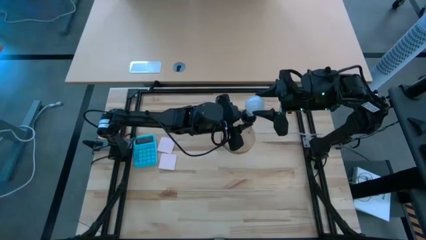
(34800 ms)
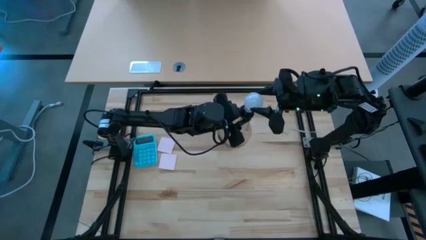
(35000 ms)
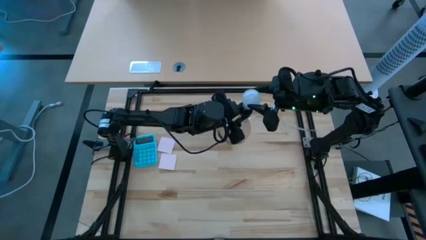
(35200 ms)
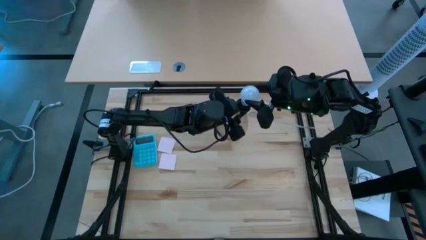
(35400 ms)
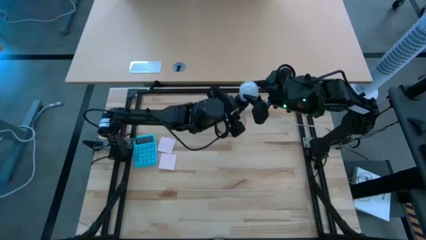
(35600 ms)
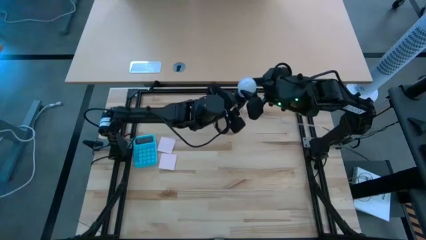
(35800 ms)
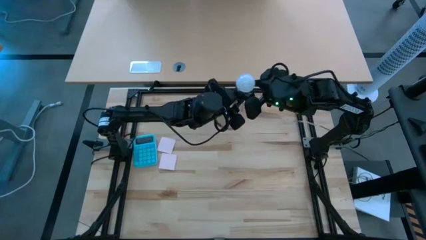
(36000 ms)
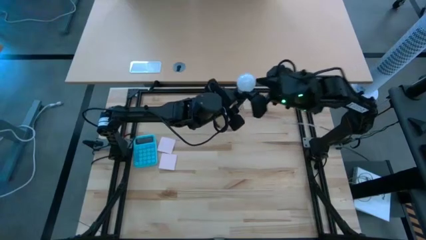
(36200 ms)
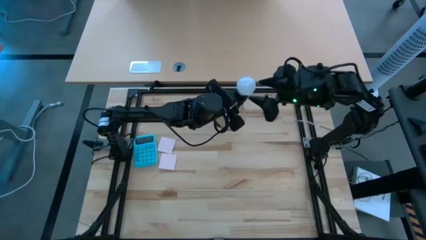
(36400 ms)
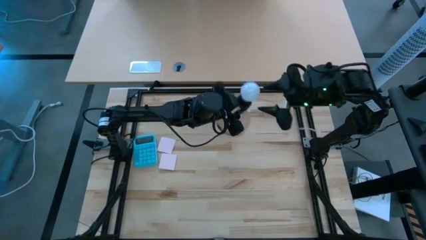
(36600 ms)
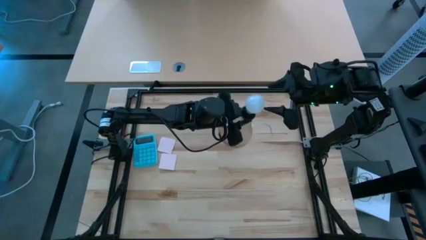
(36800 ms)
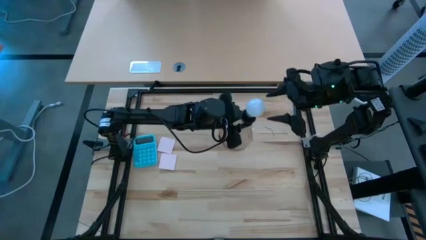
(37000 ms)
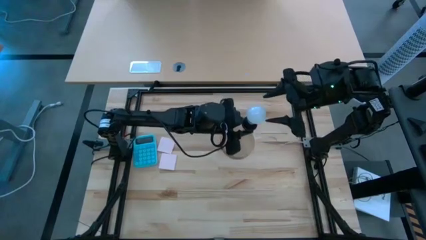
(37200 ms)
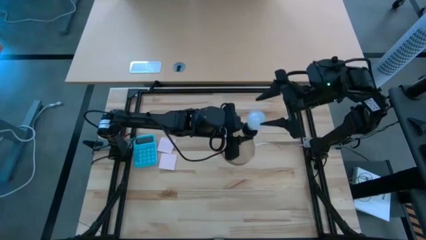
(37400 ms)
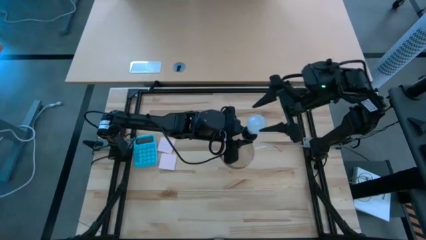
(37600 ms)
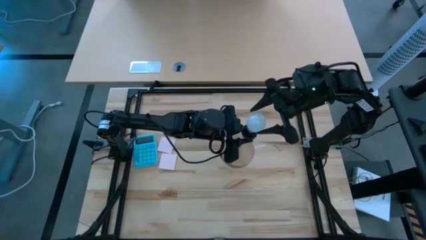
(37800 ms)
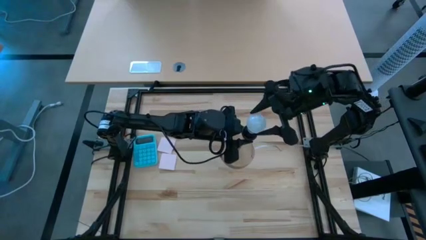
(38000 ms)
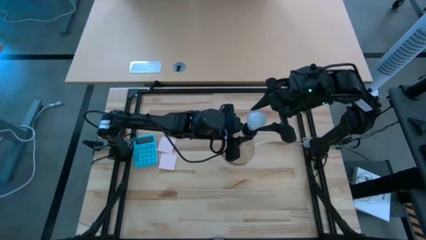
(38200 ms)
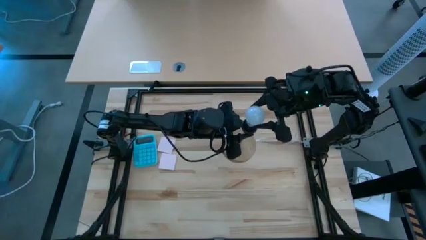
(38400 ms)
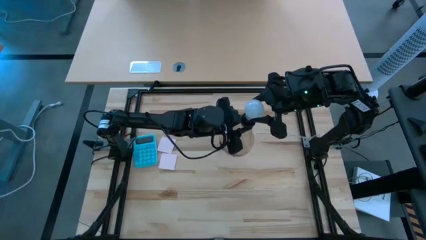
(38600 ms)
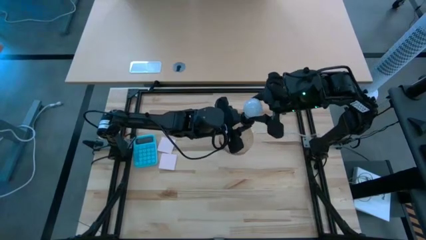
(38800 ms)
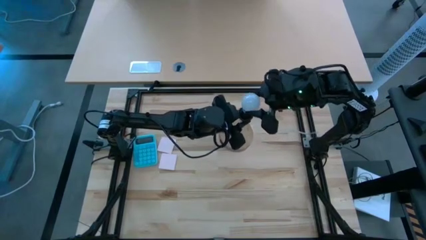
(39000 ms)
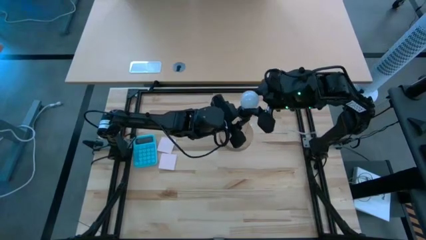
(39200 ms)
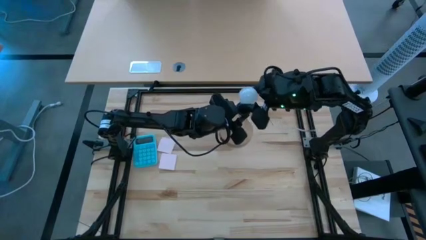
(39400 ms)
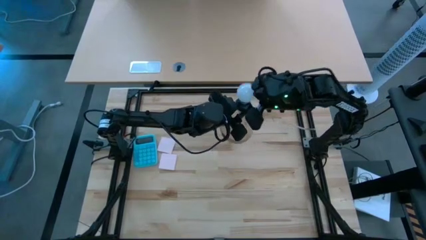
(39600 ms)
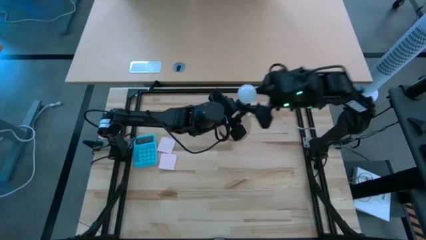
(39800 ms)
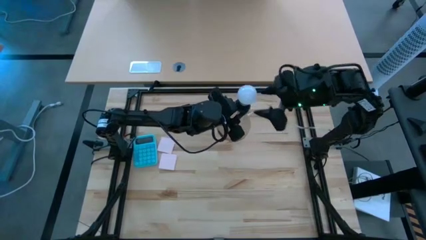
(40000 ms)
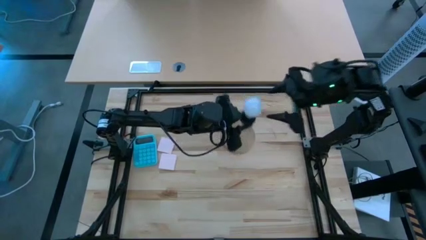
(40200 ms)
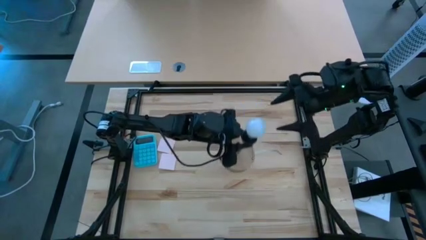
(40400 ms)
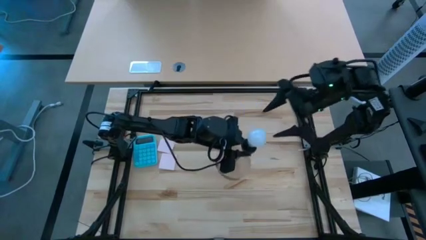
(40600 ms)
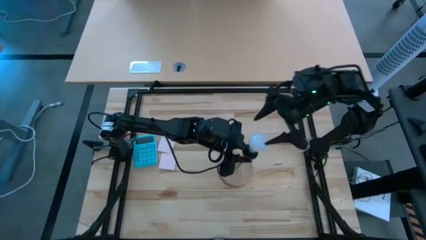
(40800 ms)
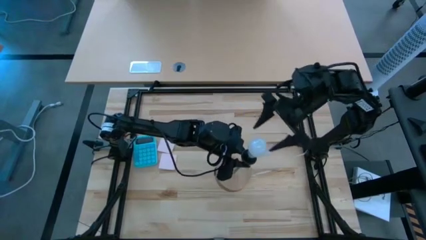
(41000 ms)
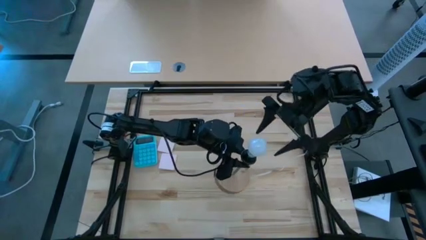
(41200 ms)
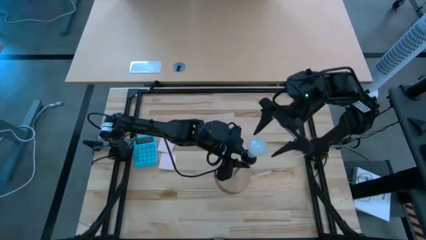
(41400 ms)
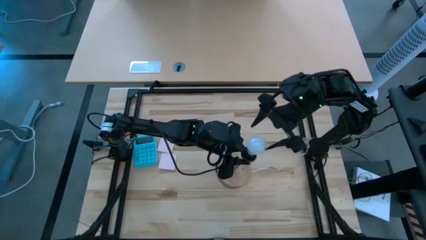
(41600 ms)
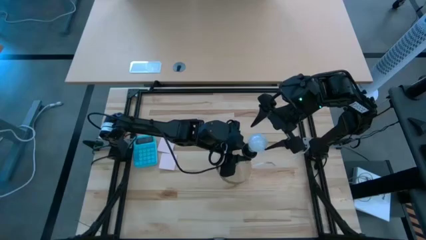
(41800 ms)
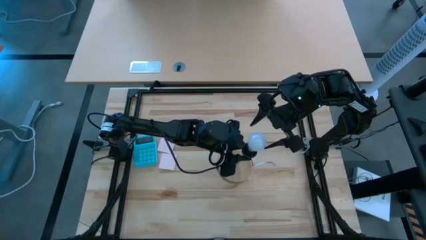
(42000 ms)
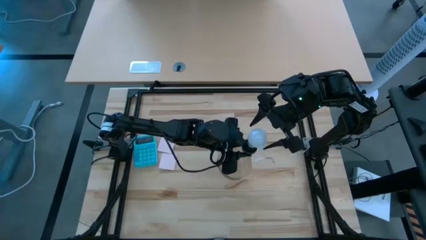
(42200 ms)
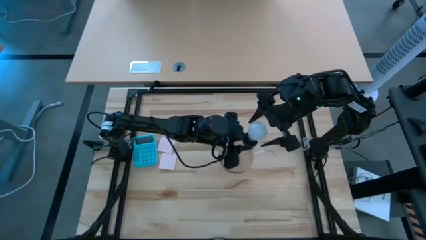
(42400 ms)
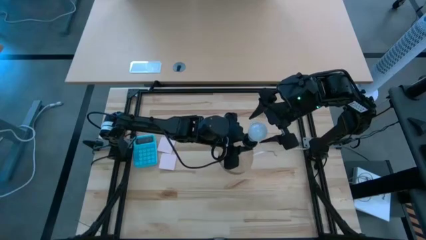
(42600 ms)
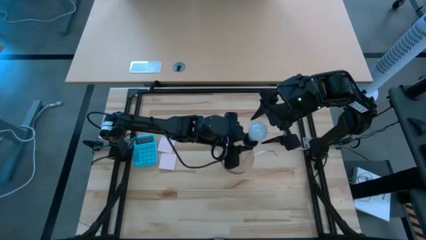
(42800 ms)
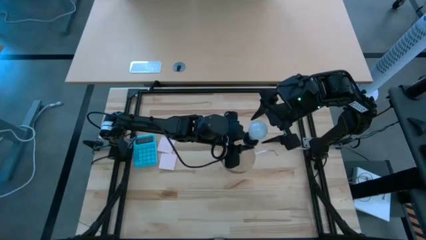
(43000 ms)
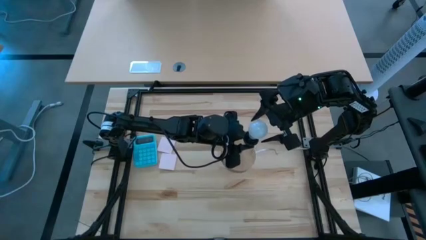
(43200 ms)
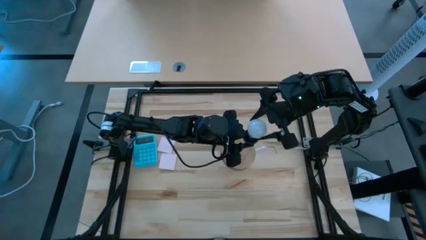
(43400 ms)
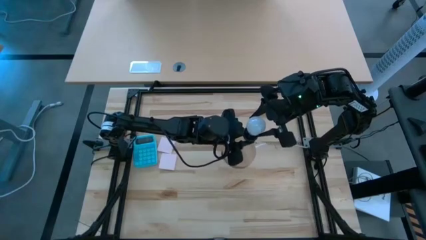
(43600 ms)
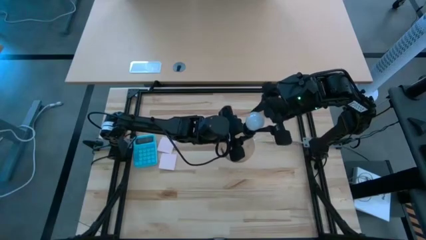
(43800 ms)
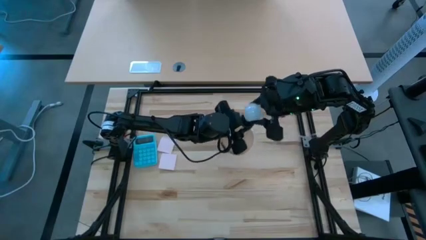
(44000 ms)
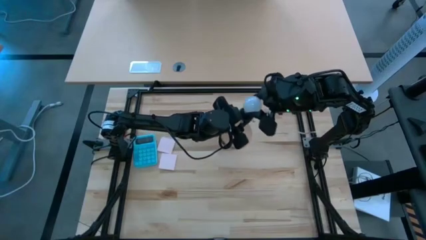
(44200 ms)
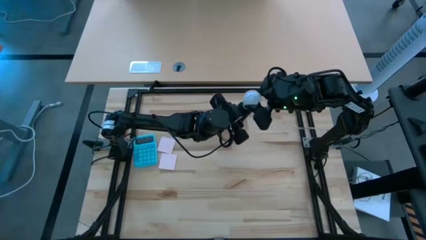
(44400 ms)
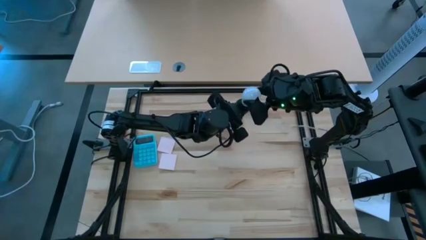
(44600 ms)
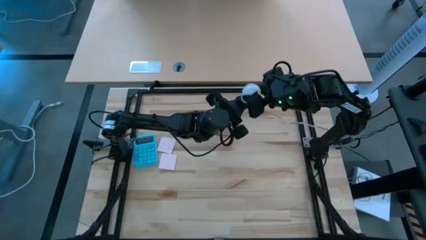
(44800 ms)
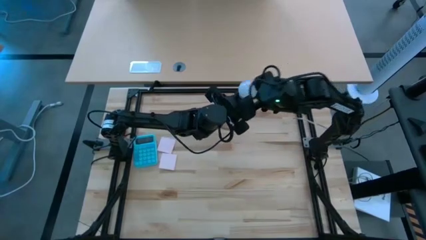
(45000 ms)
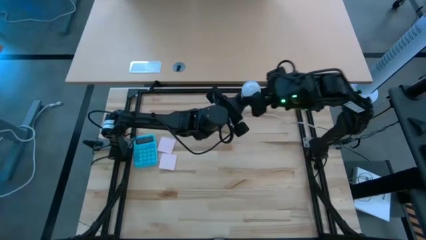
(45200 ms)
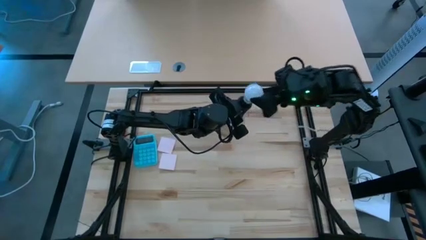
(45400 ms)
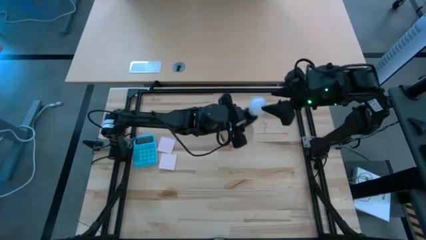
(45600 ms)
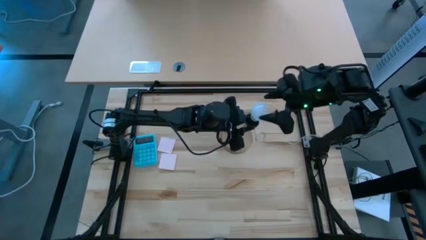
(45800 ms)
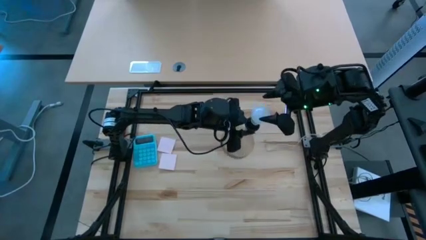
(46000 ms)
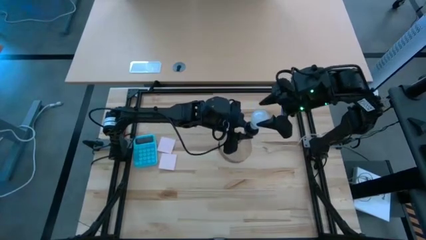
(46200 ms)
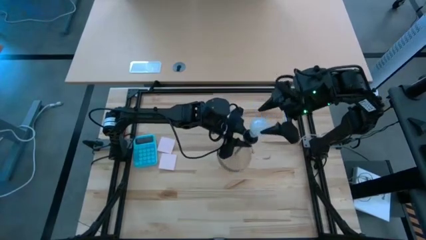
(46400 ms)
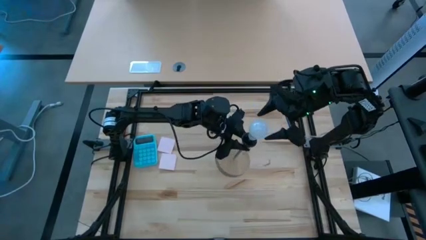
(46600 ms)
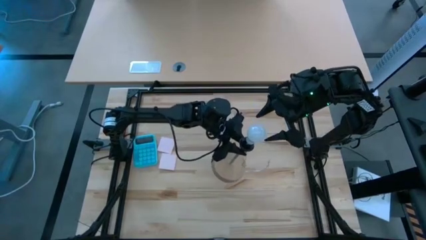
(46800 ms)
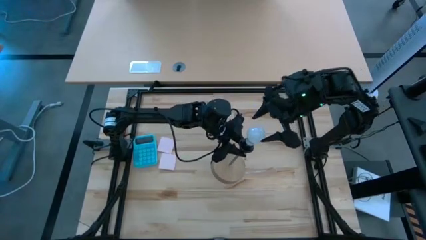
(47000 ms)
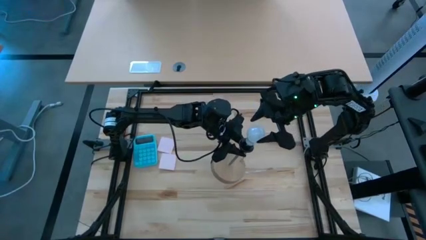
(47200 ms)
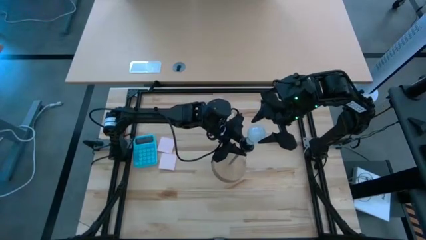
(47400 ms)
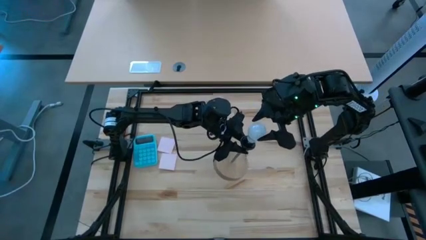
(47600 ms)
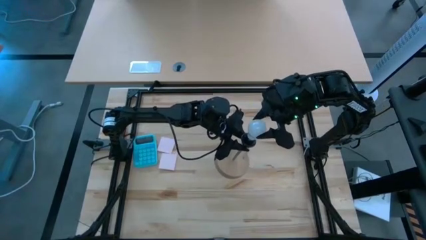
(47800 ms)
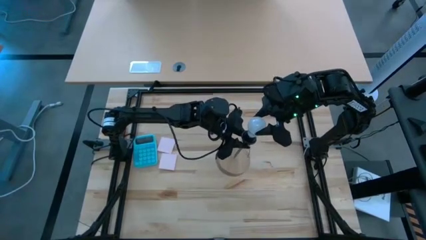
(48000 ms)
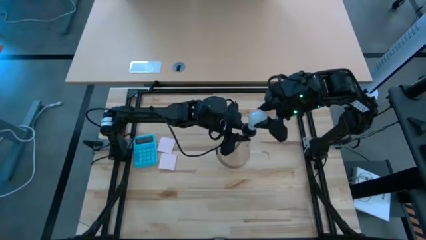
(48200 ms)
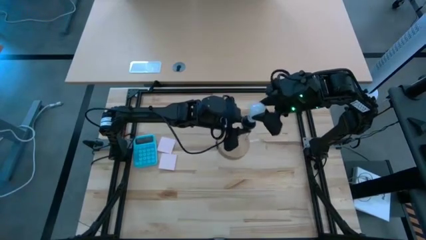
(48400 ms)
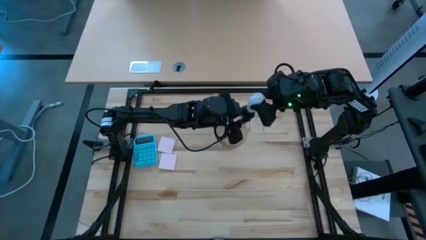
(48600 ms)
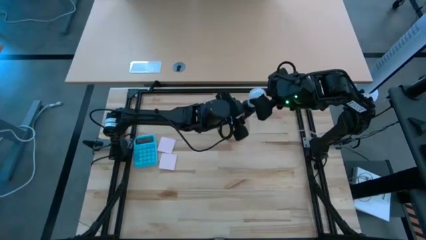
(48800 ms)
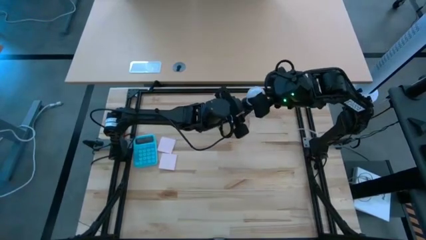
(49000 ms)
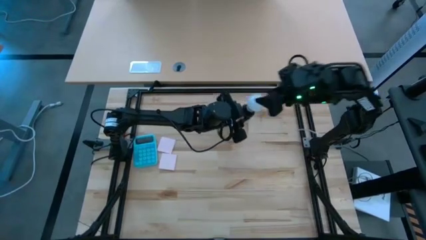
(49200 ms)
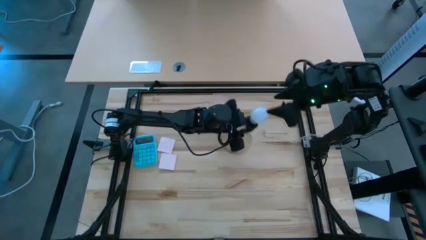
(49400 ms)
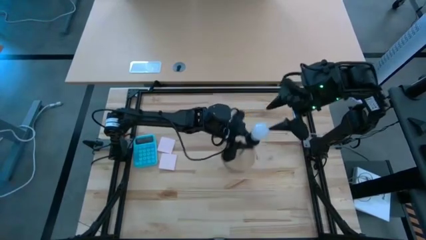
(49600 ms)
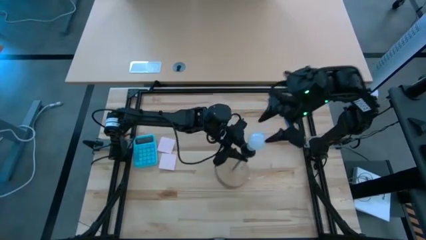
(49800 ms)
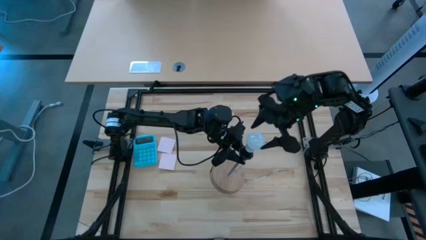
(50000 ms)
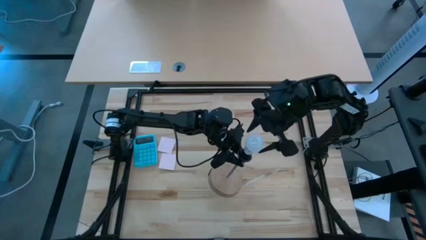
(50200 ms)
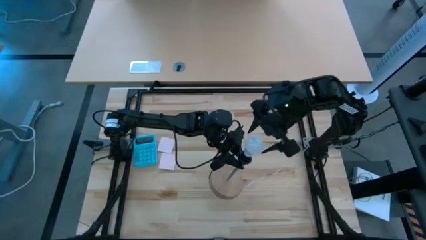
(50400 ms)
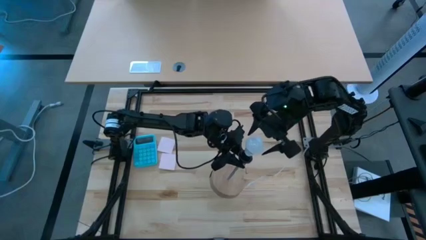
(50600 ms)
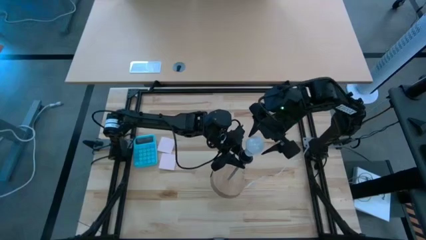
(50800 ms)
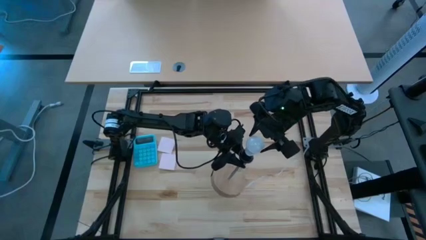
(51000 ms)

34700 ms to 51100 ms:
Task: Screw lightbulb
Insert the lightbulb into the lamp
